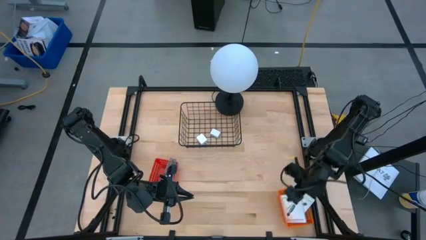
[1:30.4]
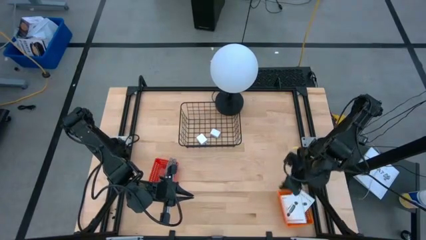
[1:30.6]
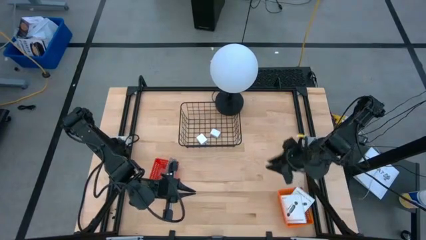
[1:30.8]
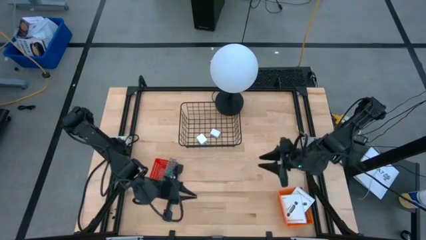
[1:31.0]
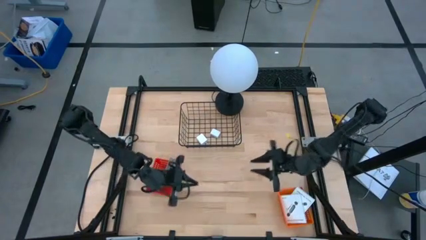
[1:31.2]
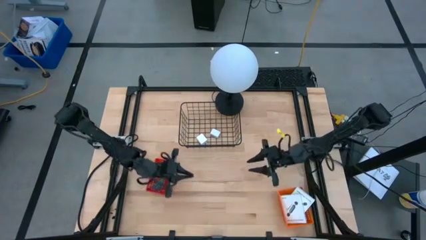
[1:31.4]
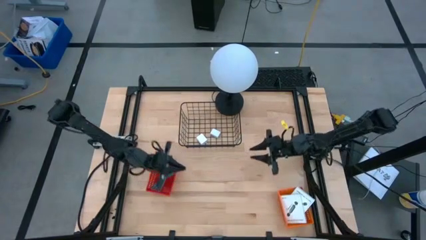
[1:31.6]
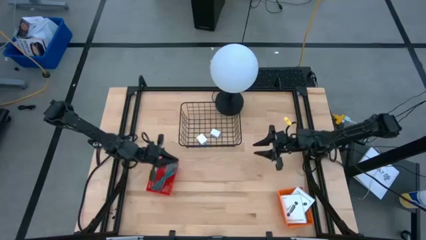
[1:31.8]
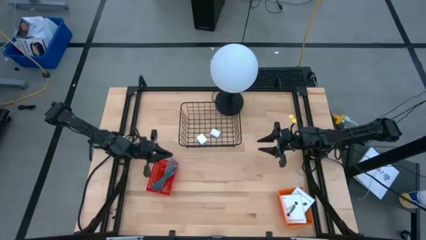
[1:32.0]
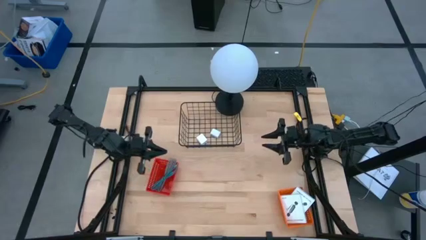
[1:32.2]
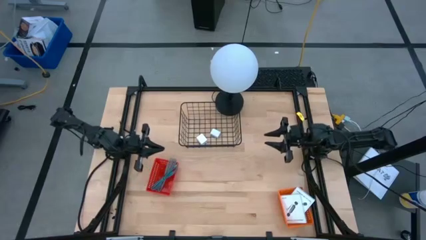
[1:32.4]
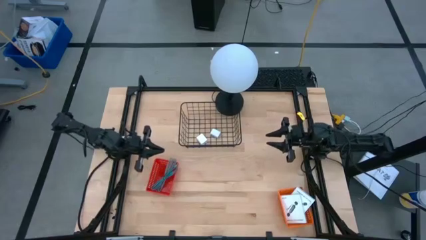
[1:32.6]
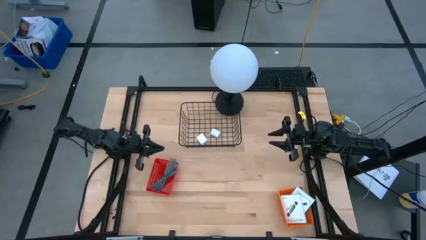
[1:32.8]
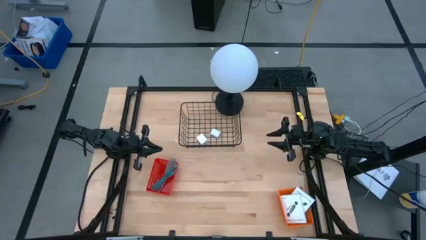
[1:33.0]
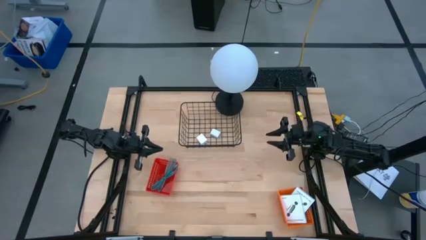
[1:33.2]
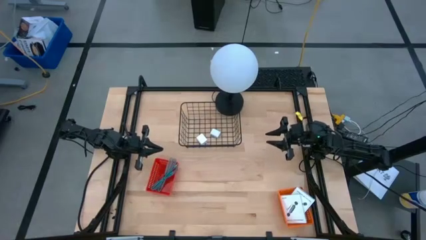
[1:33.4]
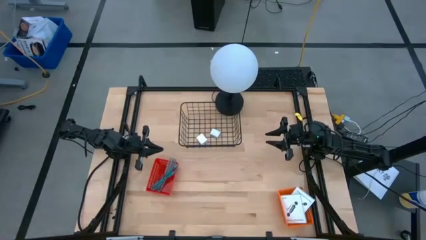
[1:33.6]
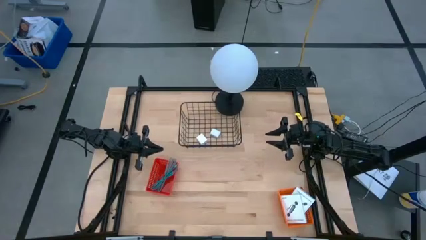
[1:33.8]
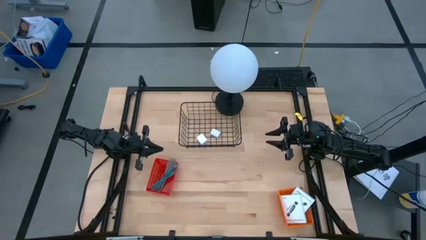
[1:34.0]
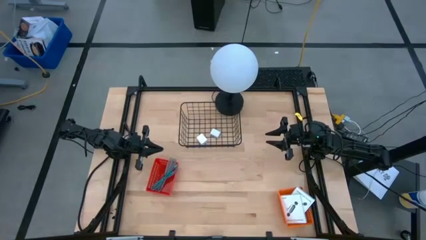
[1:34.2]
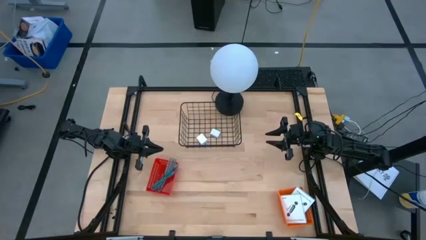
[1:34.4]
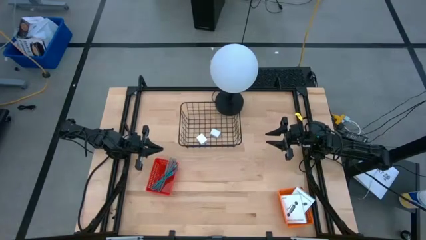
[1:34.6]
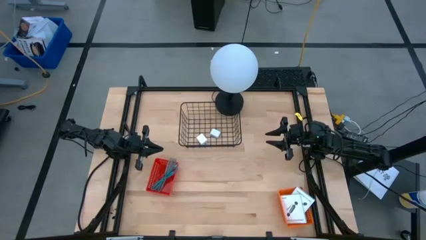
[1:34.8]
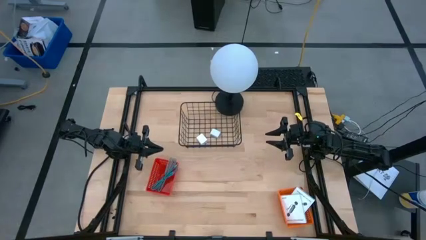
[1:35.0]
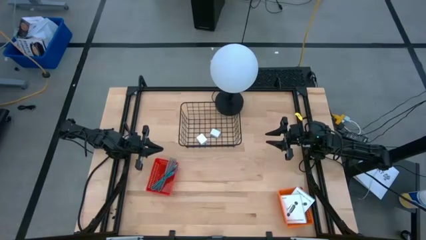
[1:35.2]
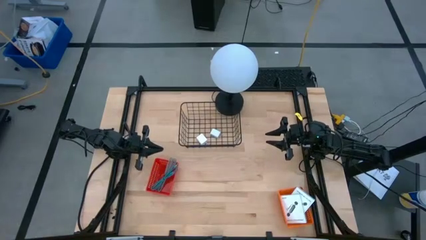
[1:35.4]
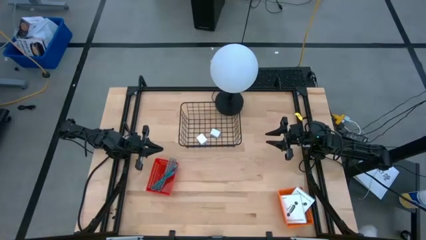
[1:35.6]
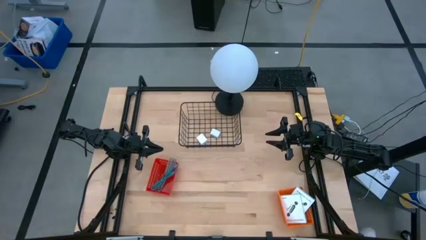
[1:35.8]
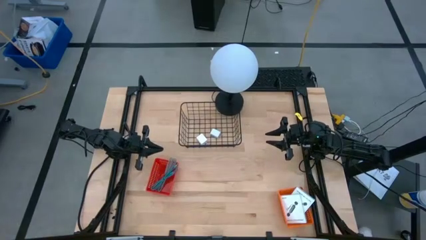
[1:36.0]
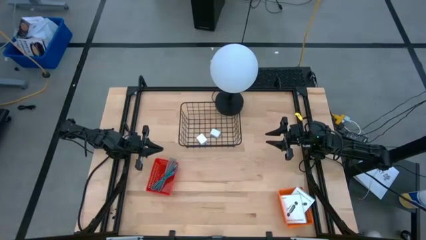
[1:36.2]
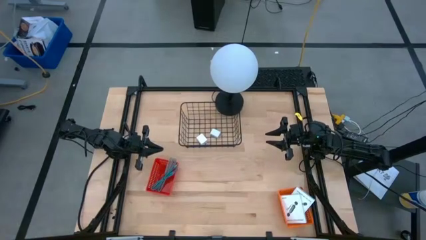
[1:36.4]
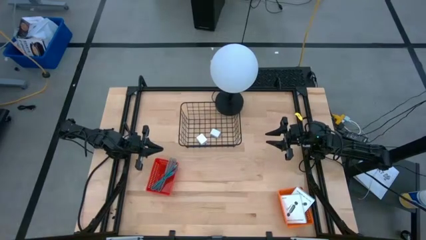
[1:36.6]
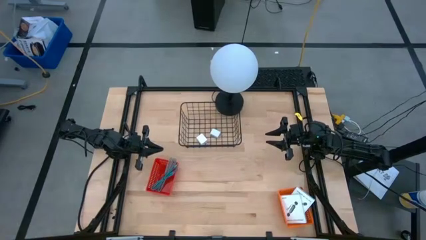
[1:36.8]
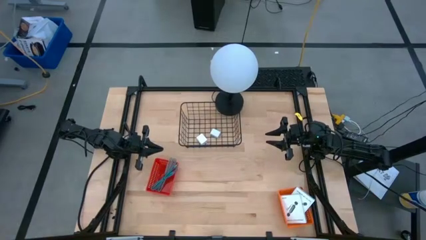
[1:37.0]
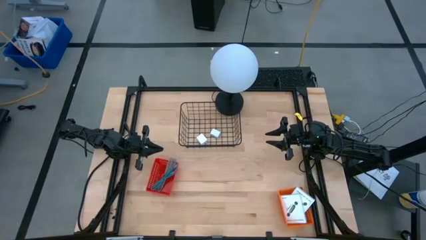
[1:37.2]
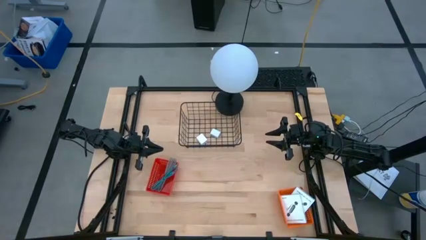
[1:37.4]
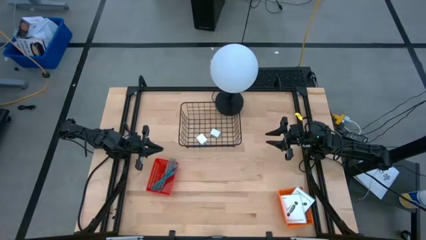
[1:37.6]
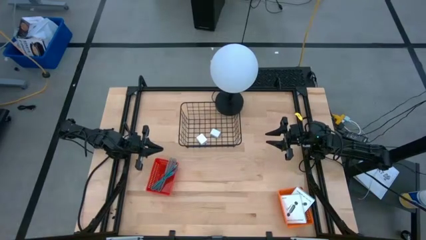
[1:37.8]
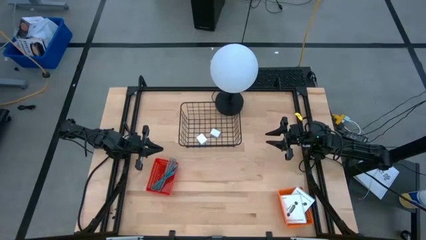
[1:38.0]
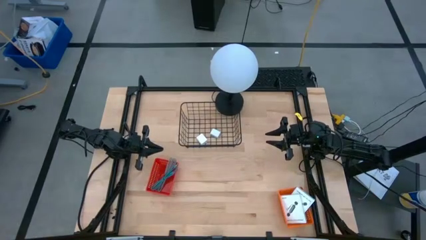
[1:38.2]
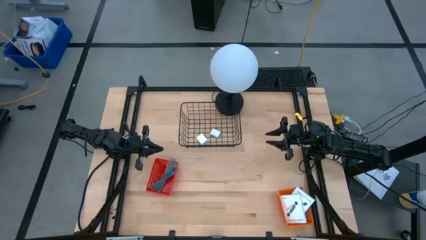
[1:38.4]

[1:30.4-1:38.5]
Task: Pick and place items into bin
Return to Home Position

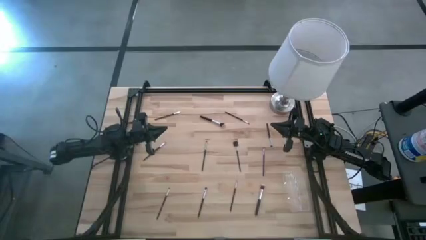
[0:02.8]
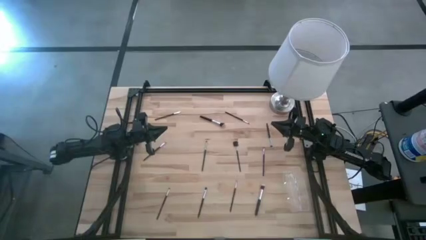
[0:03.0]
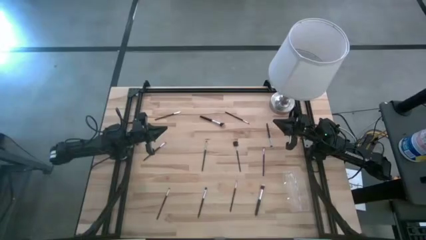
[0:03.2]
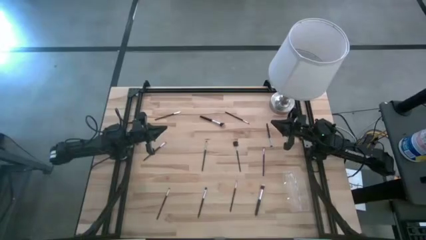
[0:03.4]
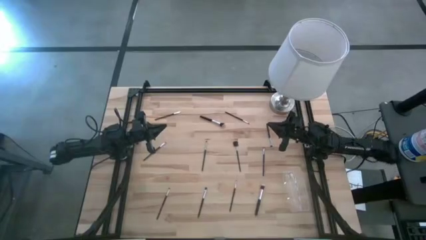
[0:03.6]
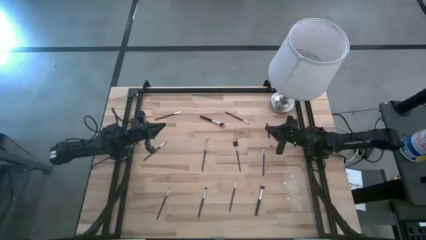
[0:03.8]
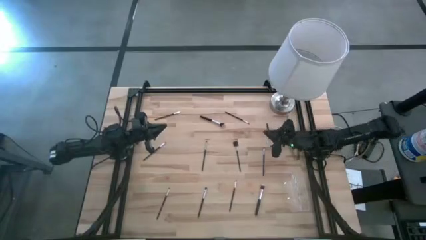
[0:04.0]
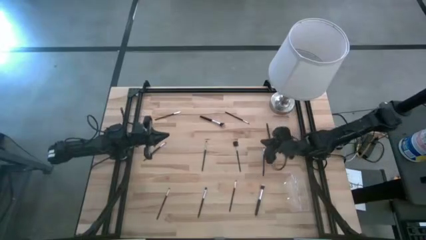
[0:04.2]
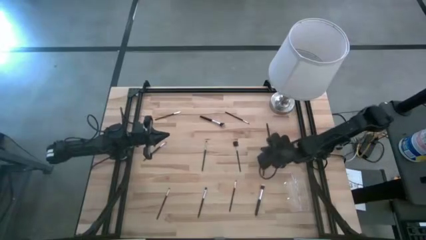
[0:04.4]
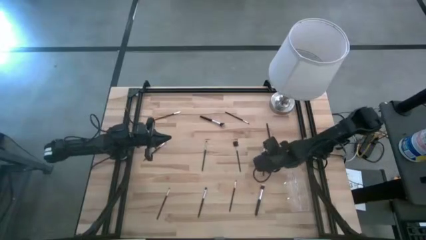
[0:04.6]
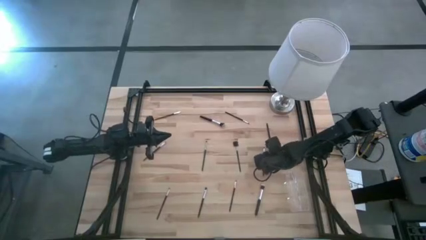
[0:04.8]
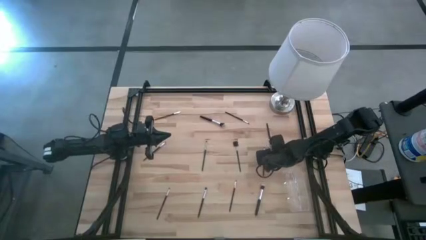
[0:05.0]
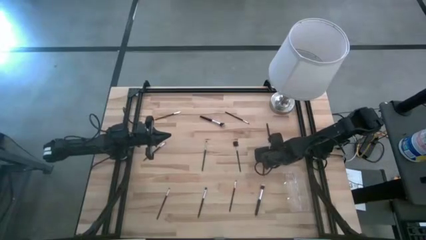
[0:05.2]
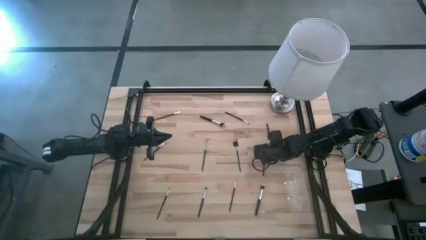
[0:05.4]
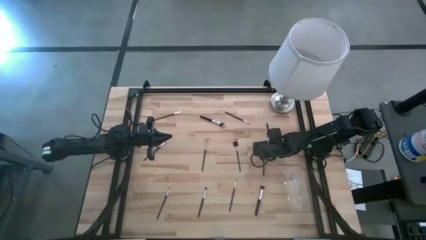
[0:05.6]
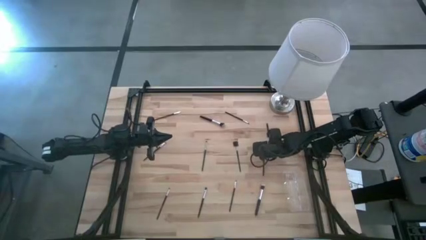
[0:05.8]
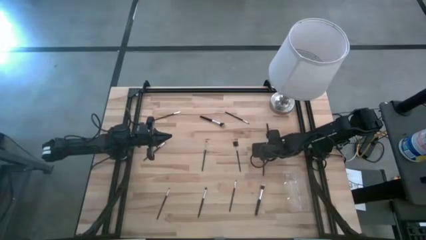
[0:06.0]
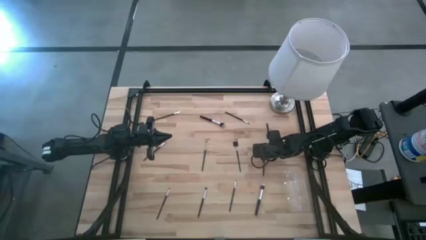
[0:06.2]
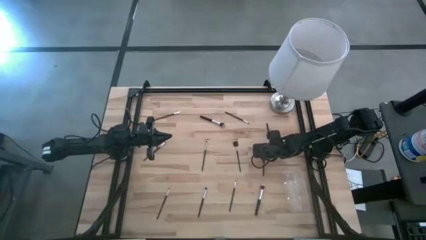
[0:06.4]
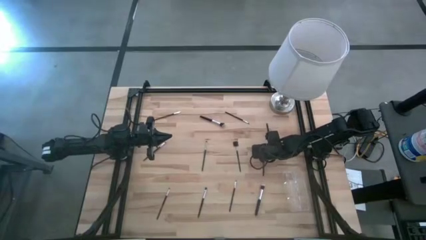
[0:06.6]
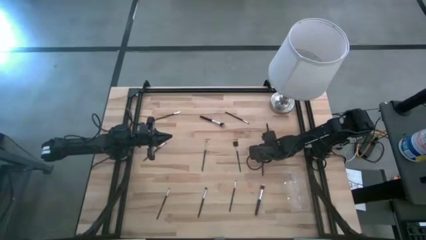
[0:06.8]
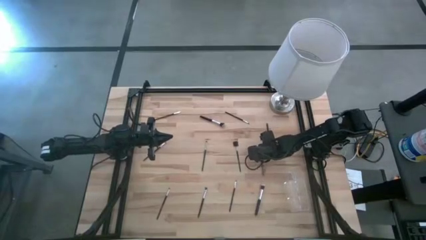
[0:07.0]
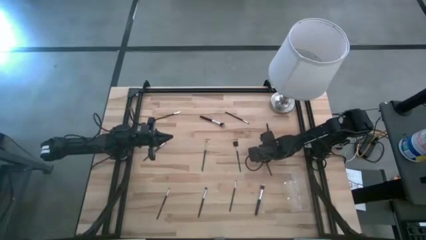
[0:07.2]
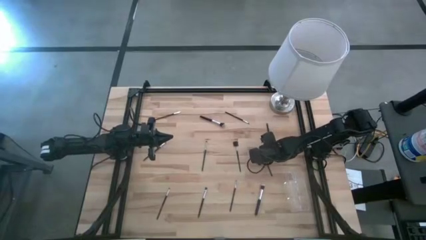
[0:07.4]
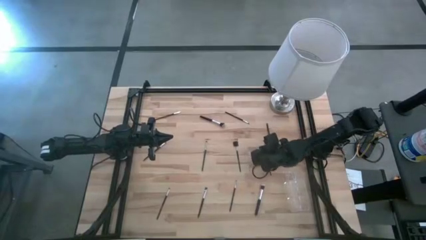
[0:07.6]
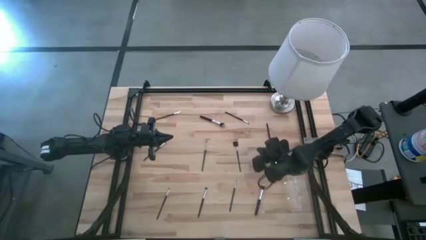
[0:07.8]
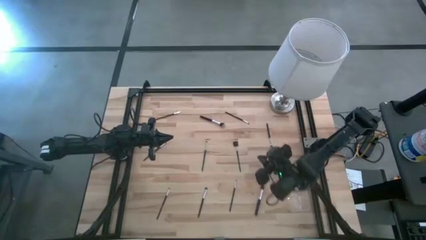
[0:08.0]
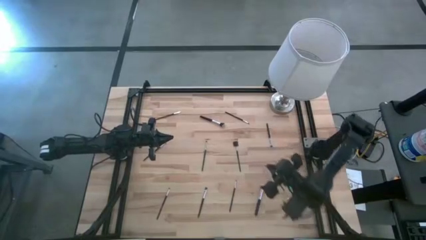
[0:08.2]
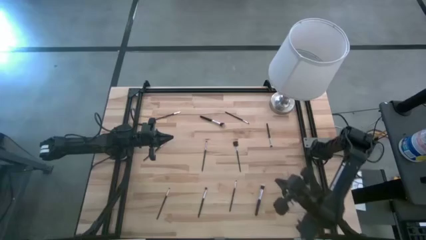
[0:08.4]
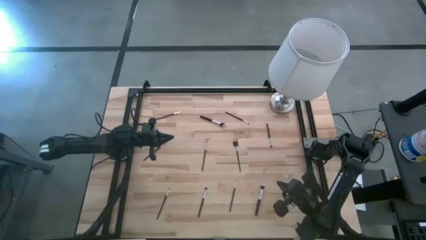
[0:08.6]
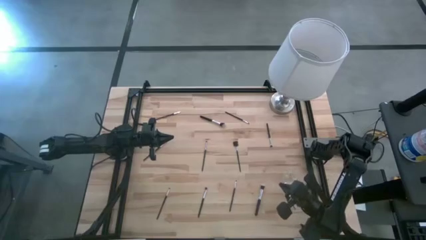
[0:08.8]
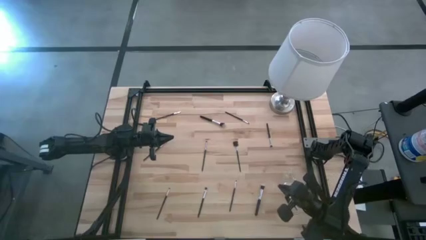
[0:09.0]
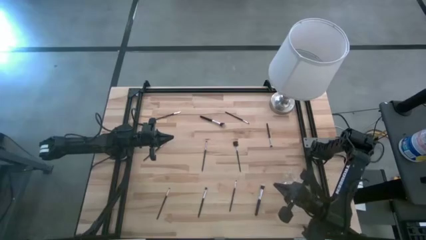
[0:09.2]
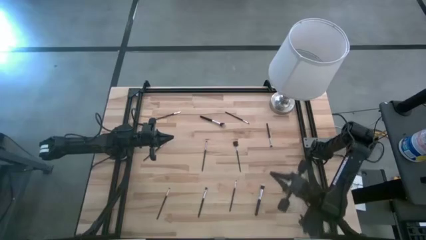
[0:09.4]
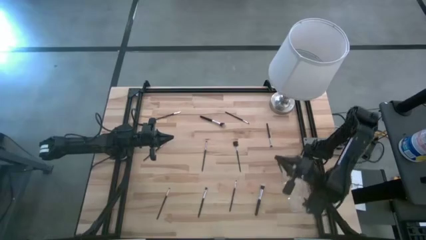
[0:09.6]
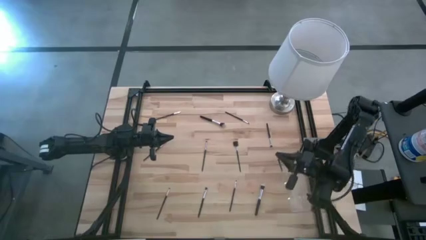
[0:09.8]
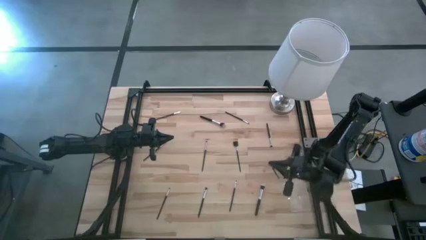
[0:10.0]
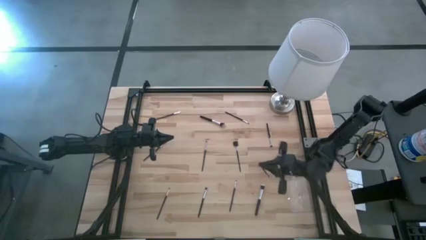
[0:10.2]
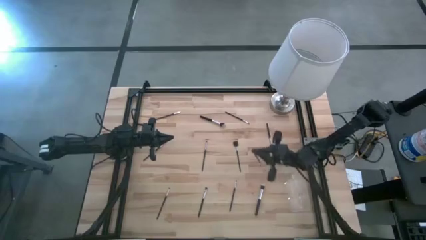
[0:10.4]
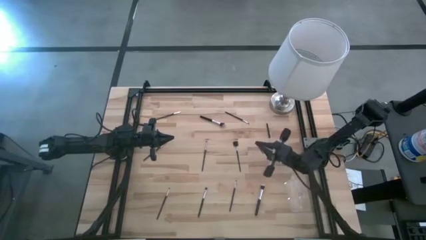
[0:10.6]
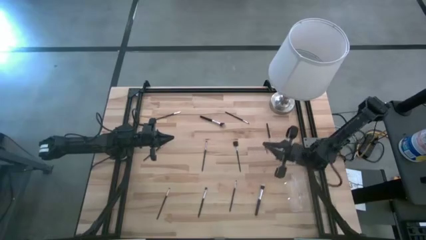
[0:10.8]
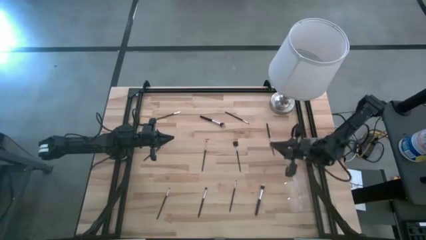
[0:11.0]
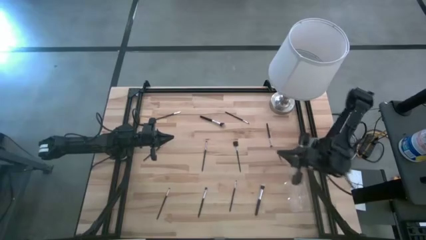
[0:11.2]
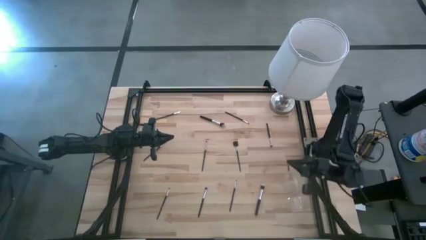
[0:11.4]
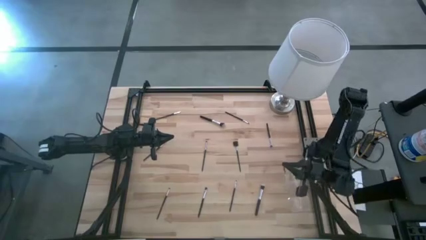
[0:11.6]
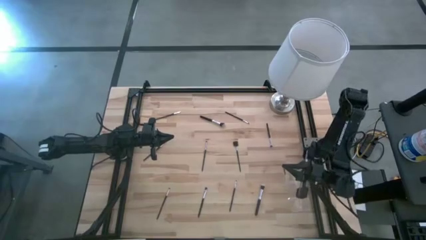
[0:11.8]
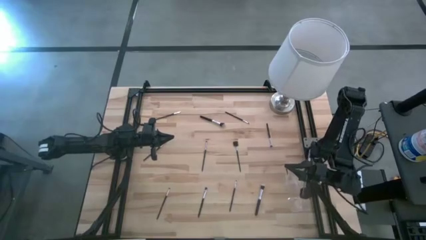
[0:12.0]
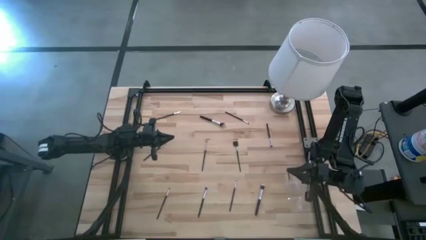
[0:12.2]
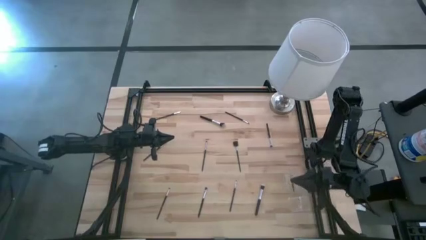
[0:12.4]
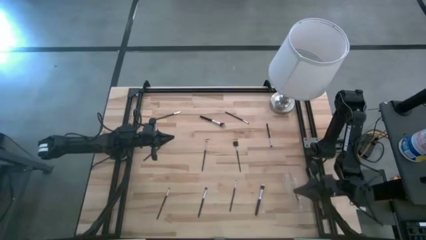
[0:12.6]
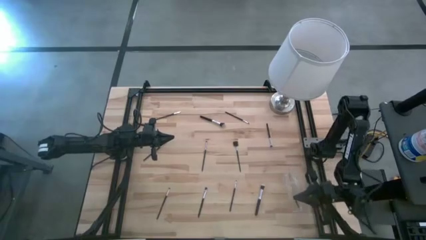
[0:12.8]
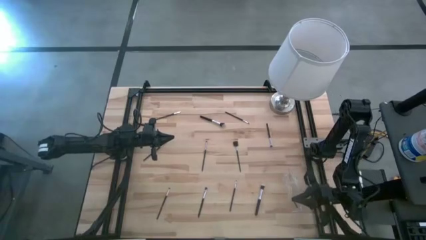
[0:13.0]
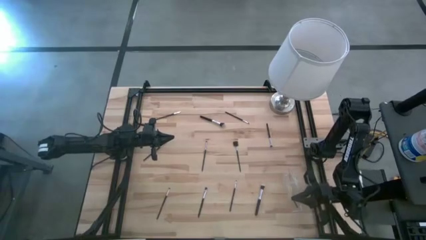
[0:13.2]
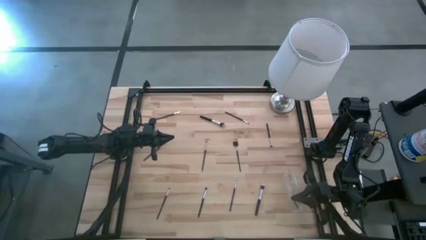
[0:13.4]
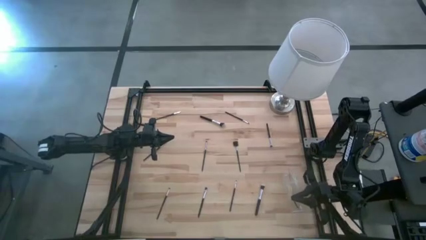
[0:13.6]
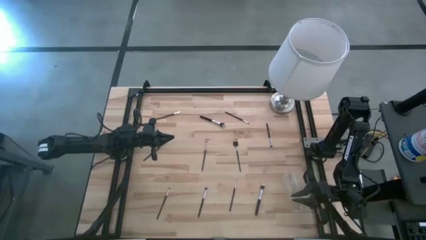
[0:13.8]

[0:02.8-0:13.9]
Task: Put items in baskets/containers
Put the eyeshadow brush into the transparent organizer
